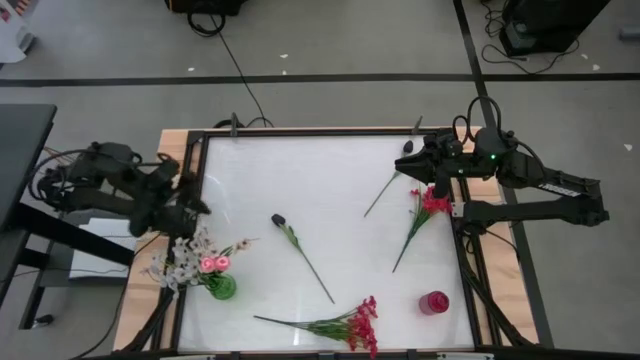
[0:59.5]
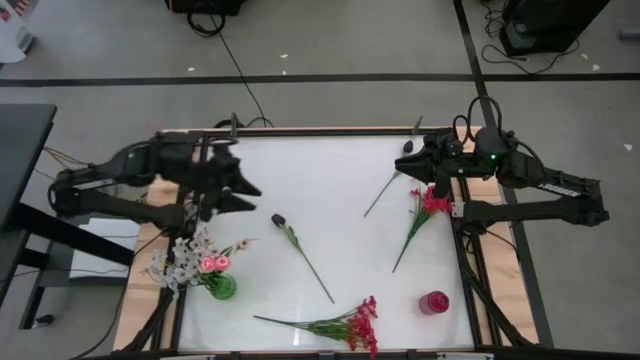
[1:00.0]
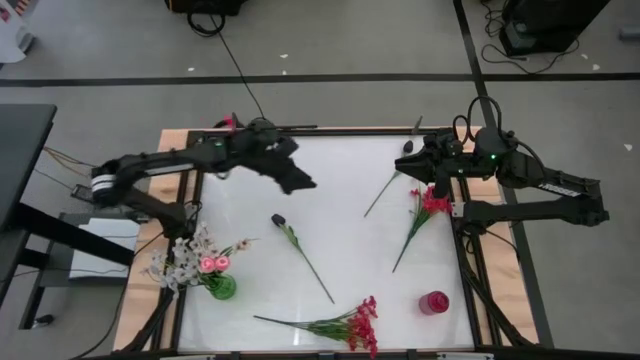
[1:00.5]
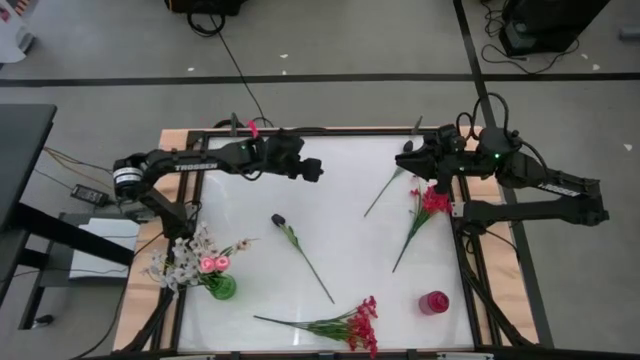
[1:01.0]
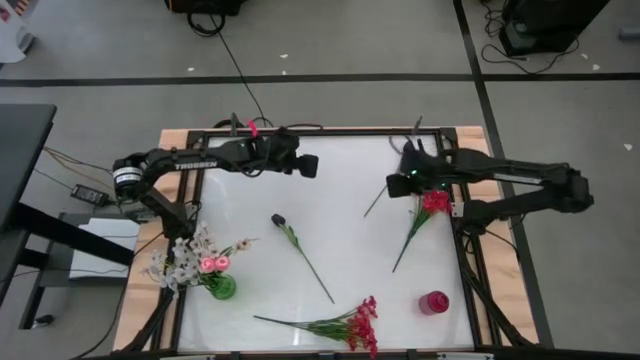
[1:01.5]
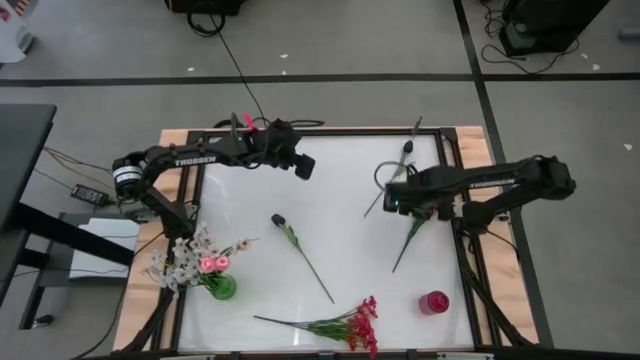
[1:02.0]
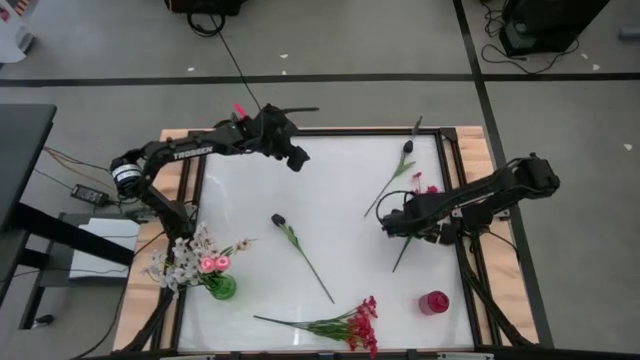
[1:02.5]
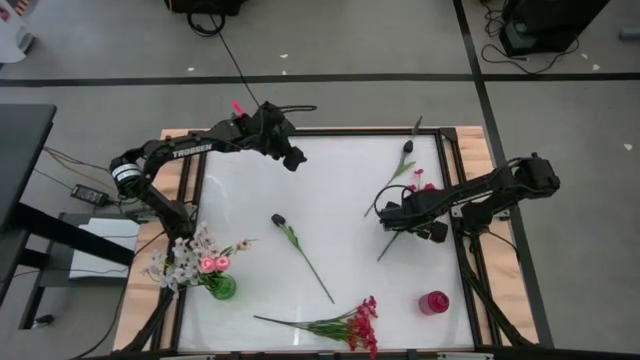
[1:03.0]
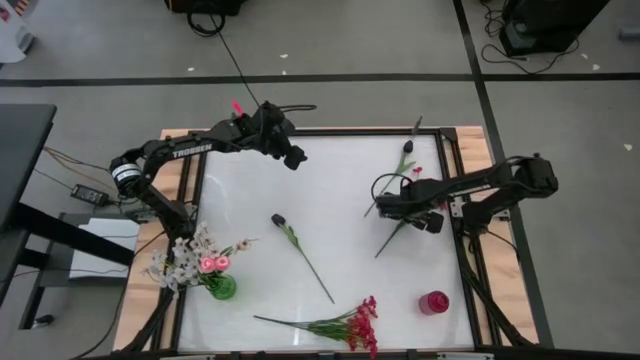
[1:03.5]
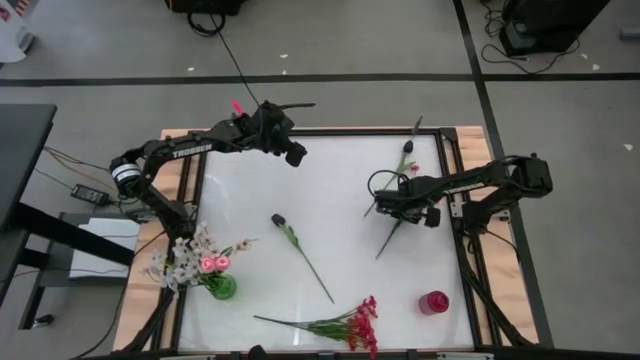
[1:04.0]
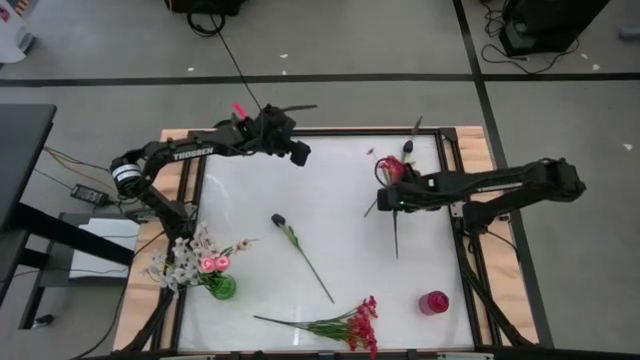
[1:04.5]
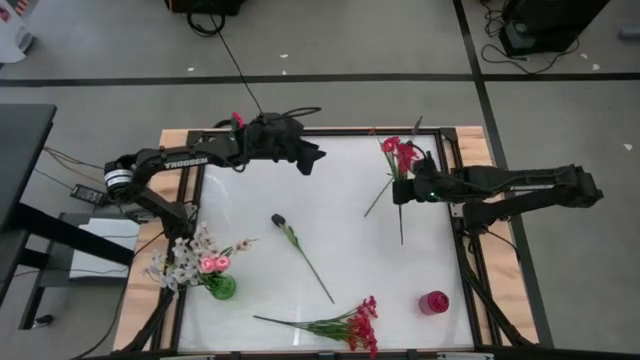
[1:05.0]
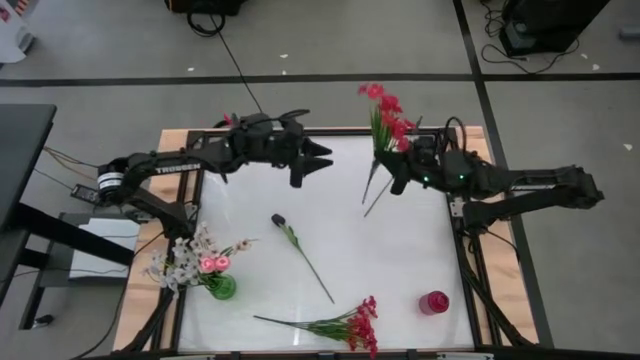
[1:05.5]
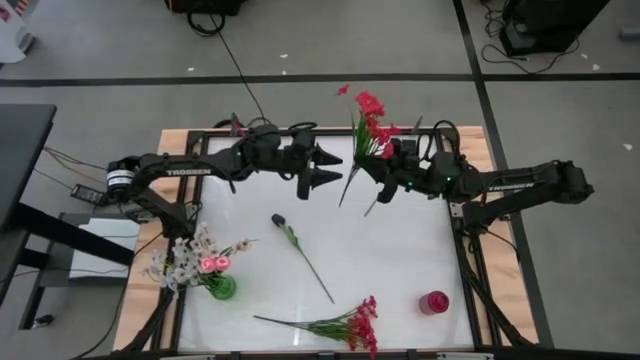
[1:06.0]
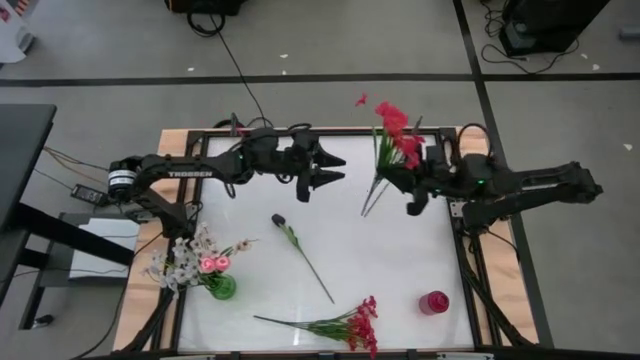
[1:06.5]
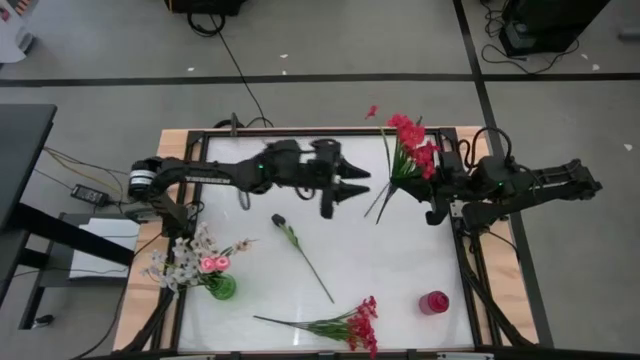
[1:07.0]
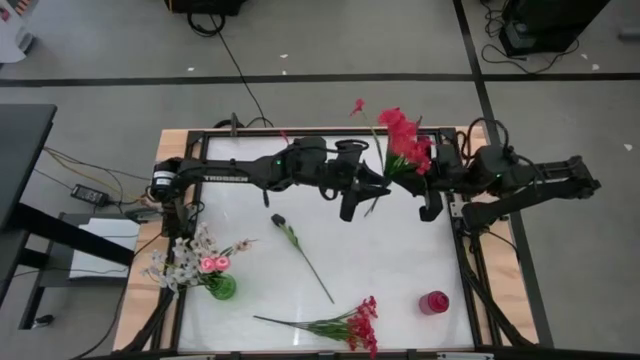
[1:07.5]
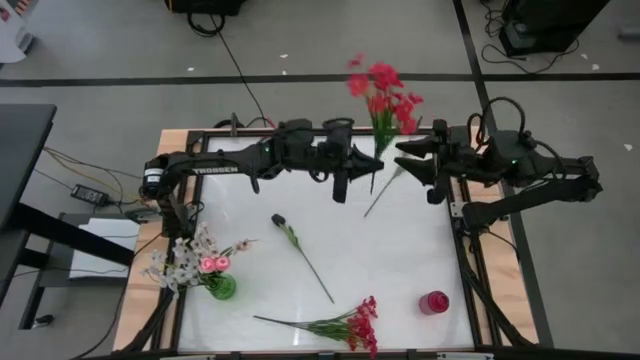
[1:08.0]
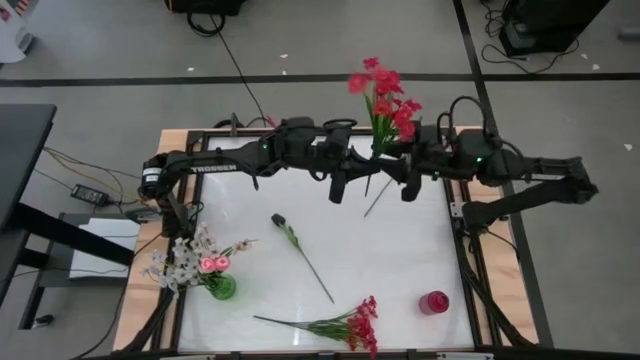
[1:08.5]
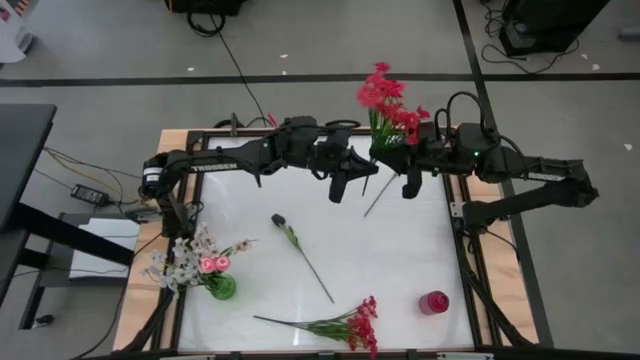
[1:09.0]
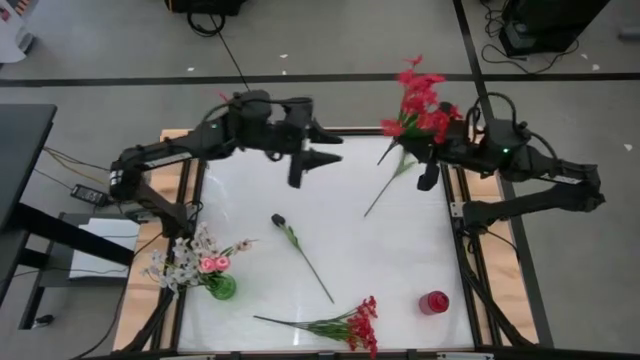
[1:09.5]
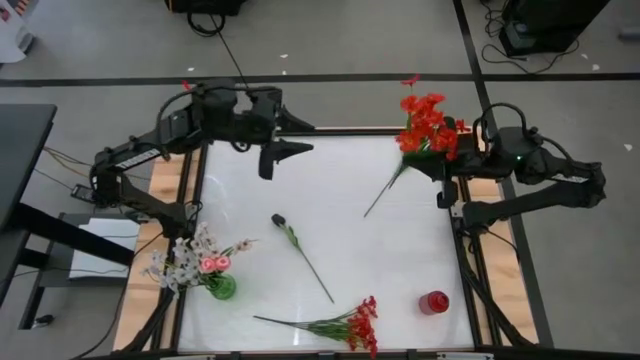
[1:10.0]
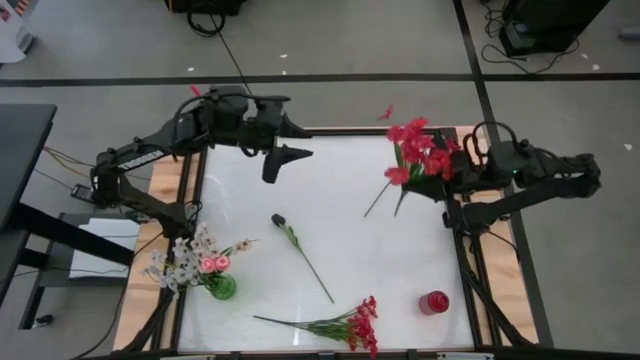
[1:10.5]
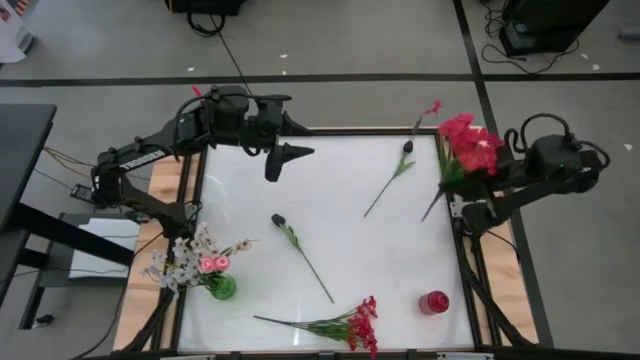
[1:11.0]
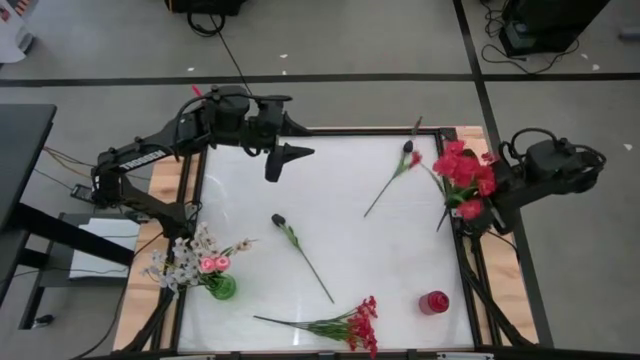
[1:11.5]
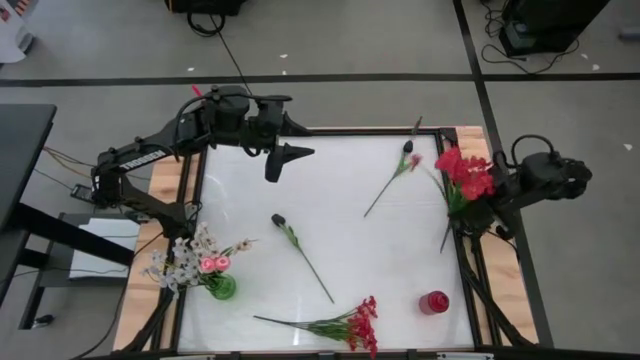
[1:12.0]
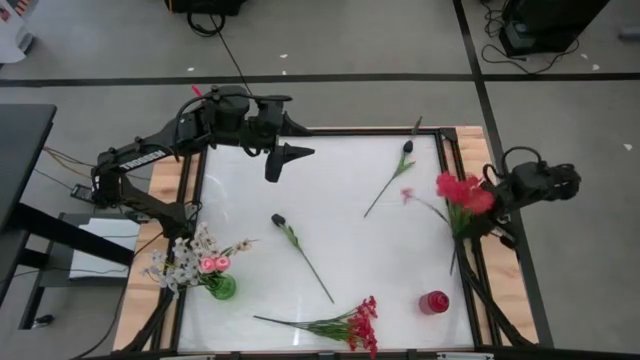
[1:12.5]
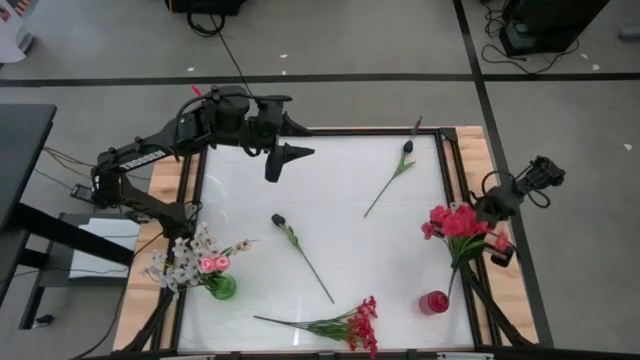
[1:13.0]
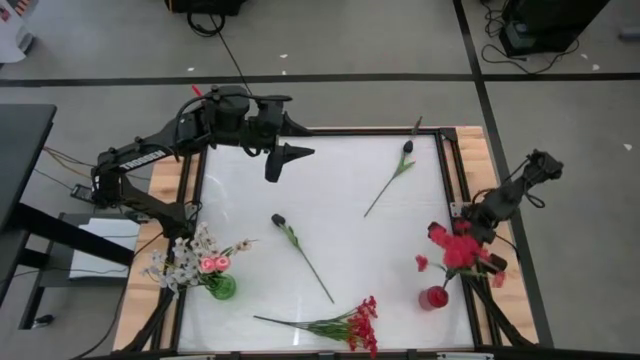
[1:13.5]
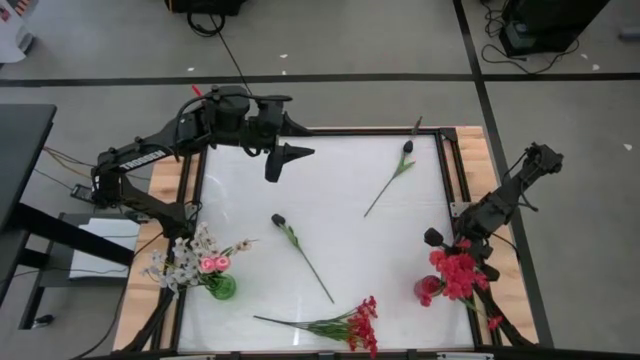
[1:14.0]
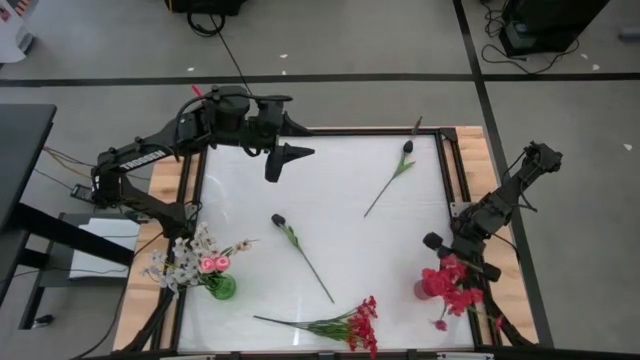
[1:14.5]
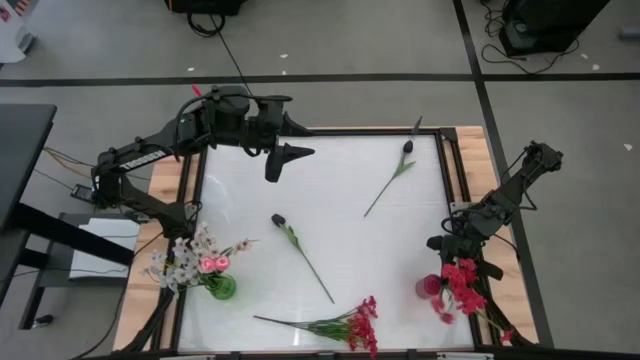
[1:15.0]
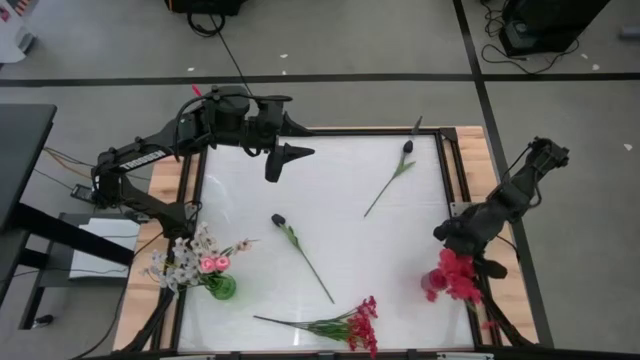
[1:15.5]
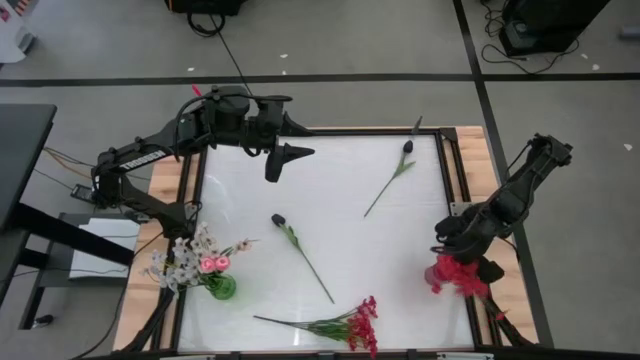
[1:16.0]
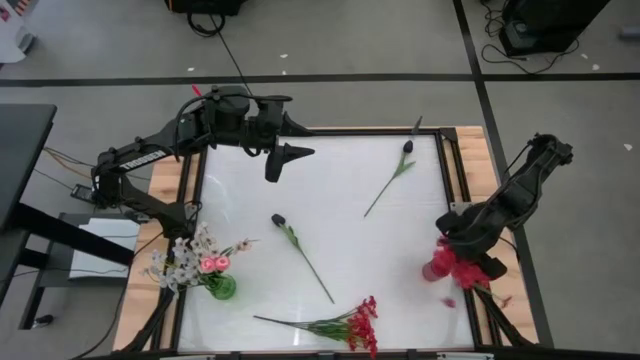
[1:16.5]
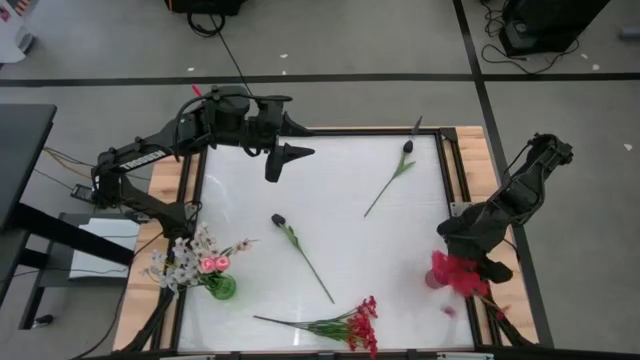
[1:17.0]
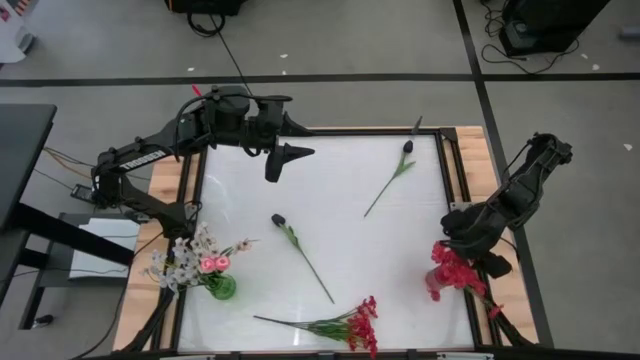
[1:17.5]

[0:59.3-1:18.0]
Task: Sort flowers into vase by color
Put the right red flowers into the red vase

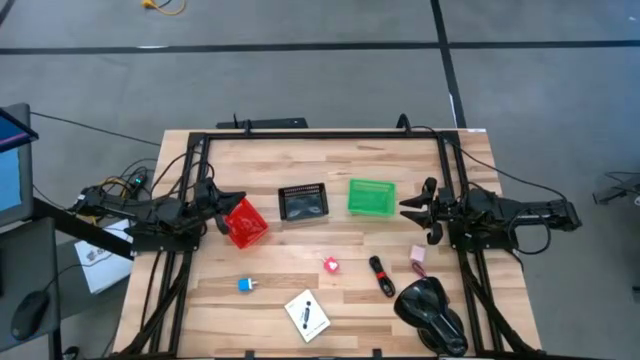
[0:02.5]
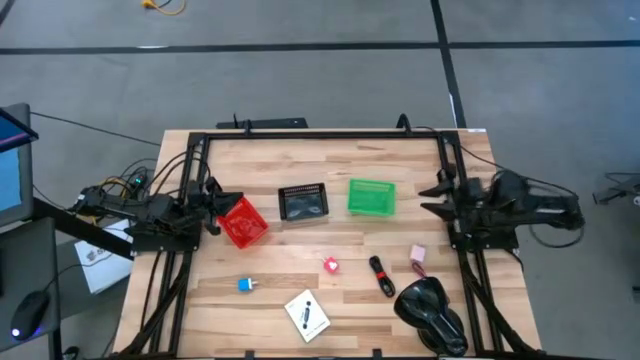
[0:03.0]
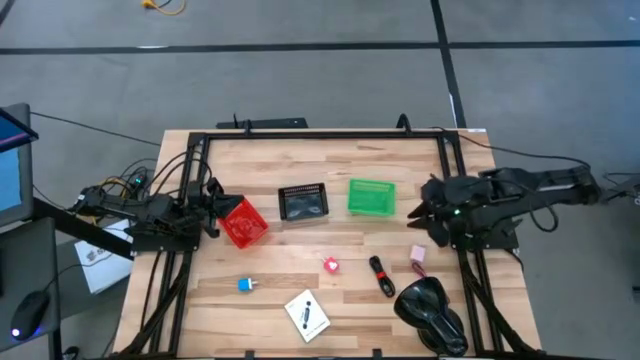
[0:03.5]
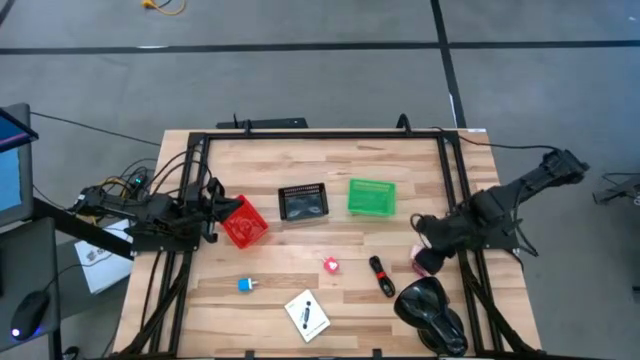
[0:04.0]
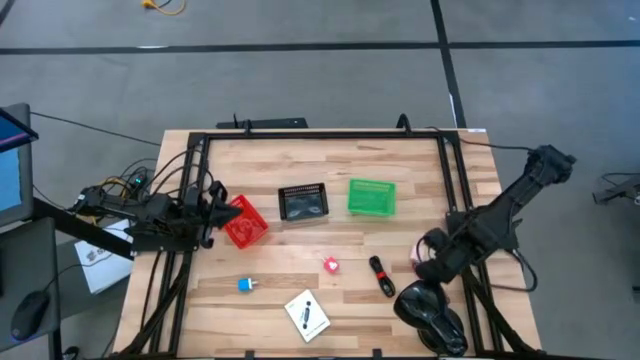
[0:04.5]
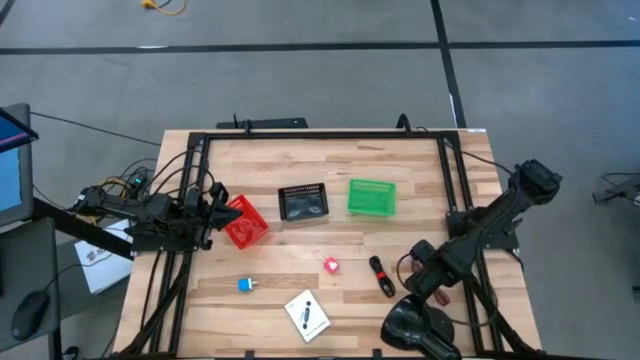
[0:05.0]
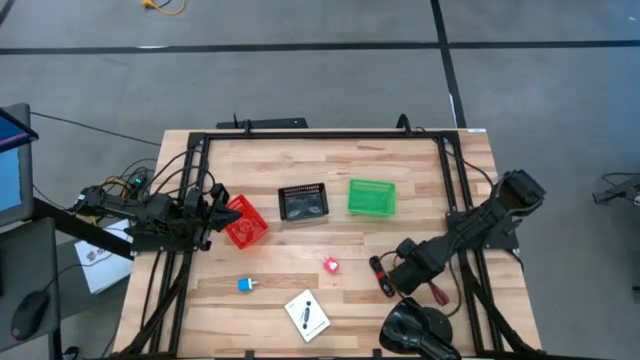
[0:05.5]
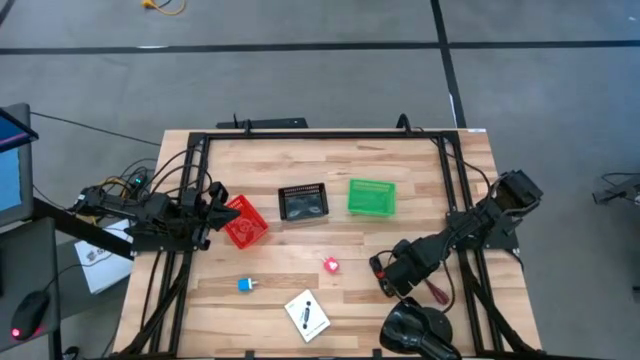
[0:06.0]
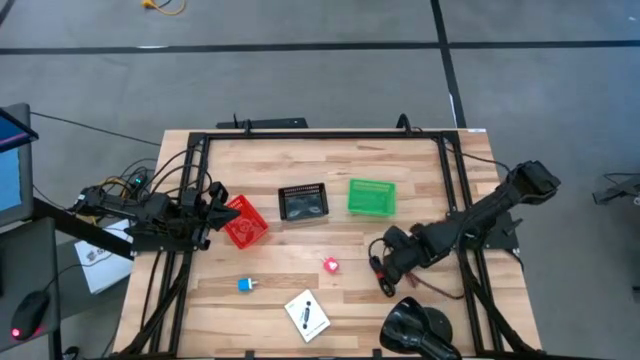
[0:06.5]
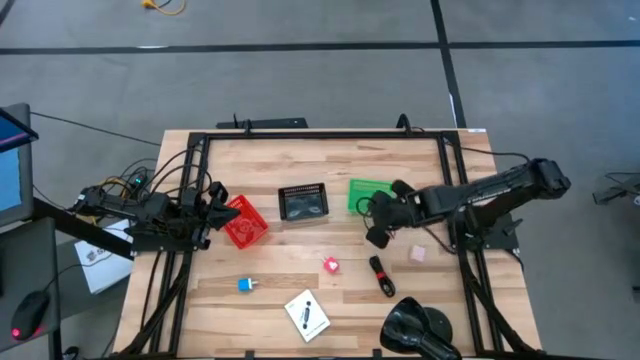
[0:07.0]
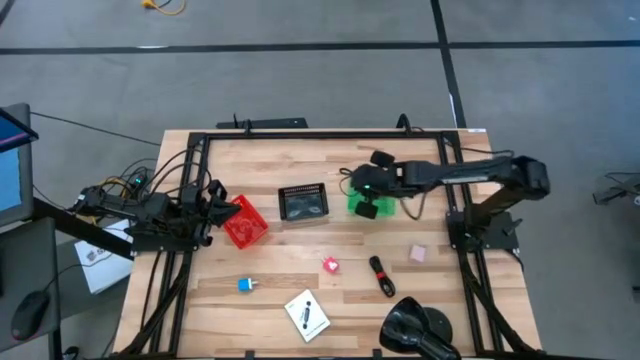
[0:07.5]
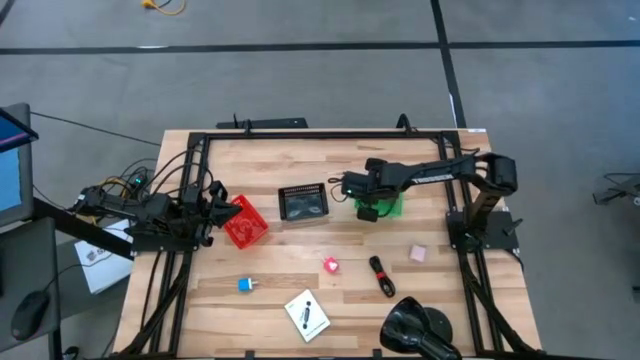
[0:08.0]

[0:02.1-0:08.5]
Task: Pick and place items into bin
Put the pink charger cable into the green bin
